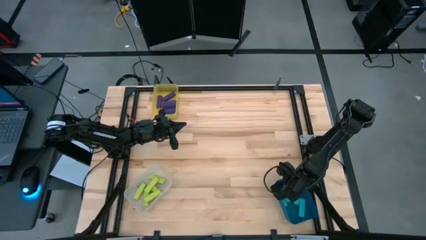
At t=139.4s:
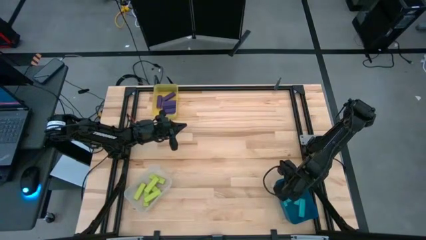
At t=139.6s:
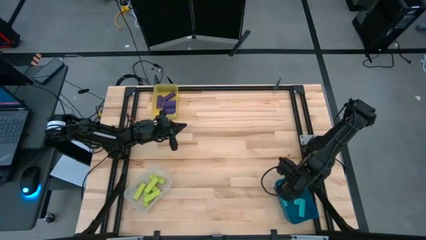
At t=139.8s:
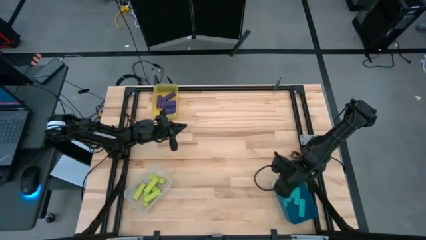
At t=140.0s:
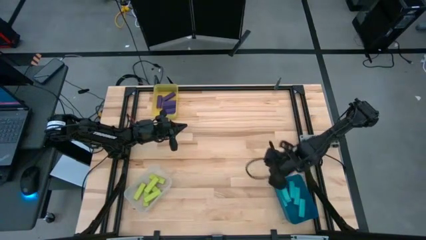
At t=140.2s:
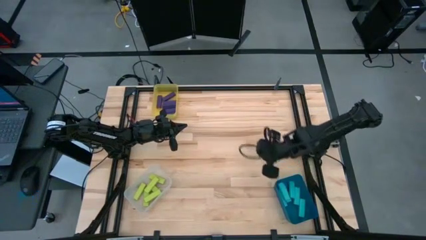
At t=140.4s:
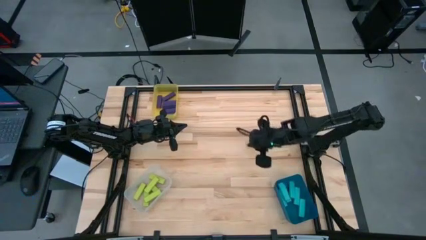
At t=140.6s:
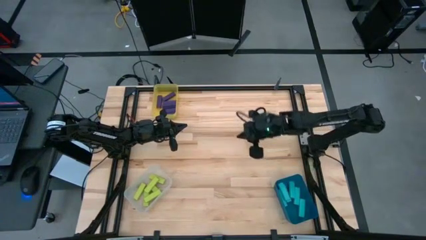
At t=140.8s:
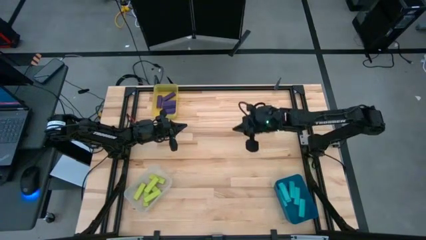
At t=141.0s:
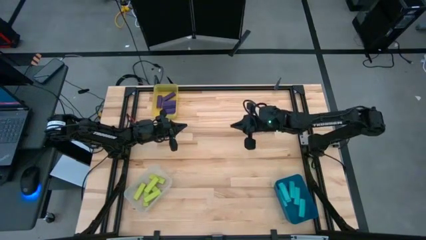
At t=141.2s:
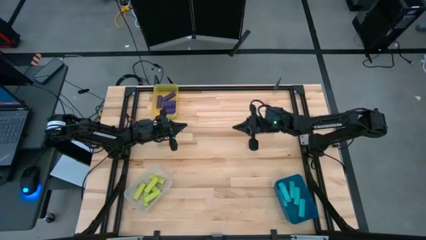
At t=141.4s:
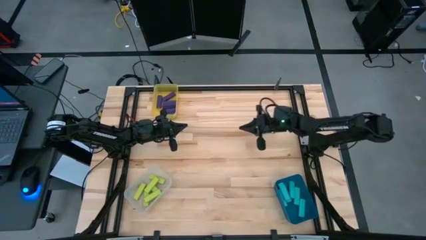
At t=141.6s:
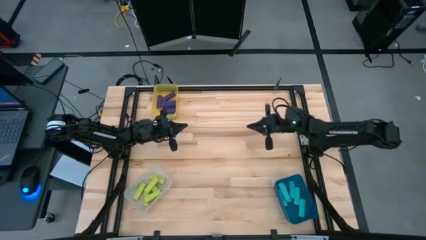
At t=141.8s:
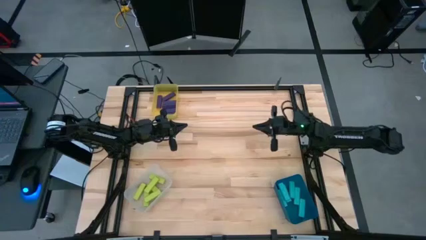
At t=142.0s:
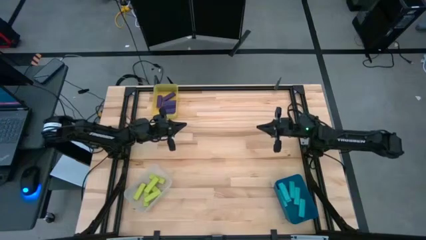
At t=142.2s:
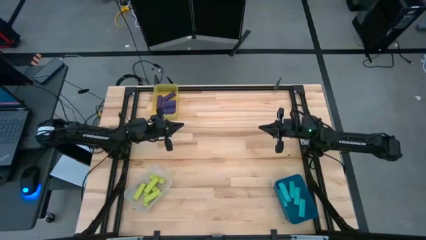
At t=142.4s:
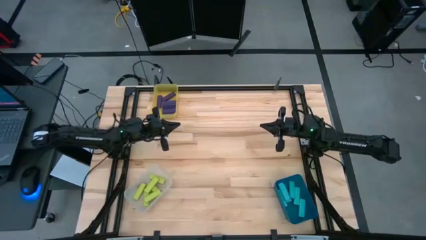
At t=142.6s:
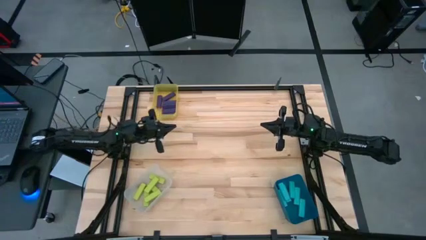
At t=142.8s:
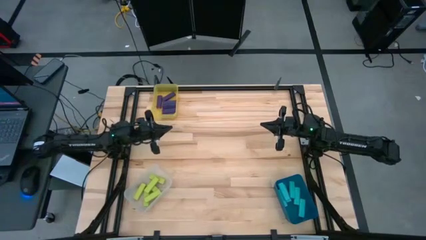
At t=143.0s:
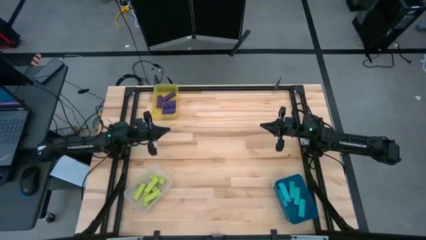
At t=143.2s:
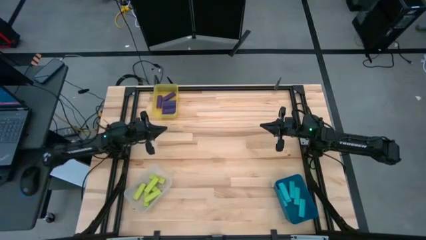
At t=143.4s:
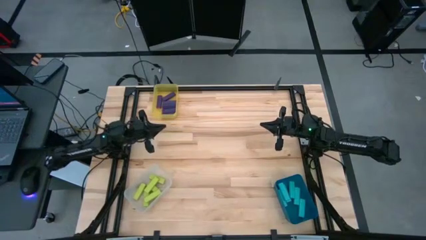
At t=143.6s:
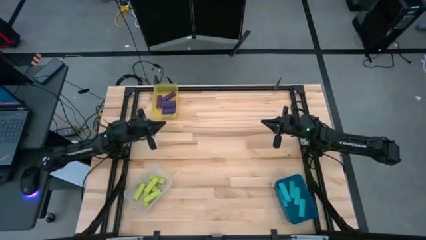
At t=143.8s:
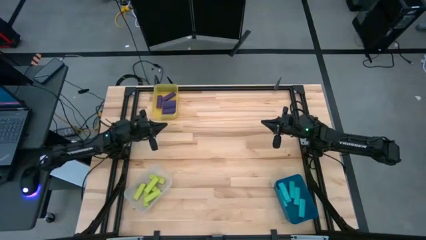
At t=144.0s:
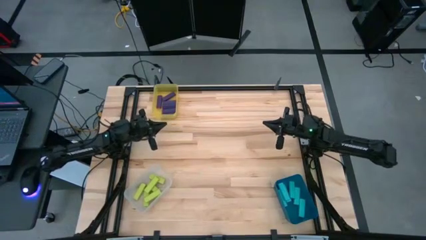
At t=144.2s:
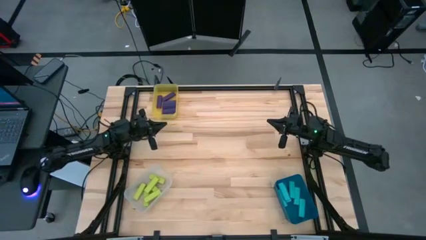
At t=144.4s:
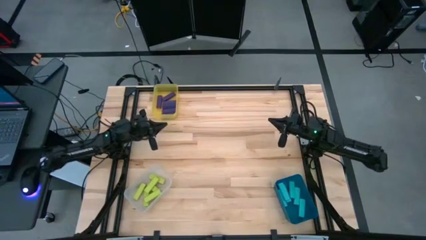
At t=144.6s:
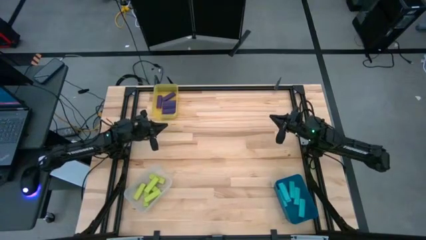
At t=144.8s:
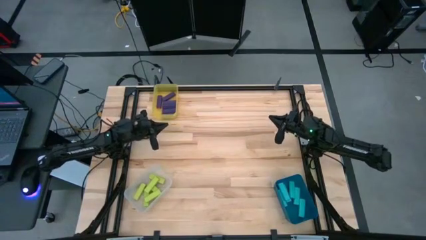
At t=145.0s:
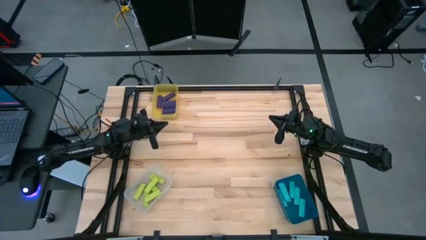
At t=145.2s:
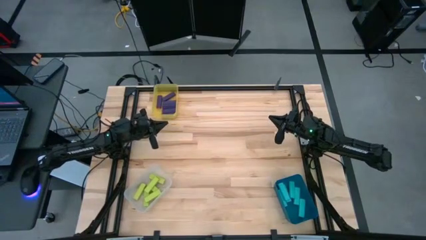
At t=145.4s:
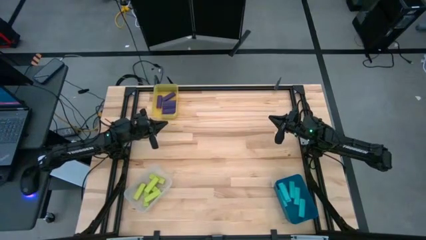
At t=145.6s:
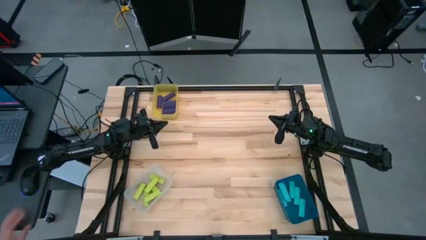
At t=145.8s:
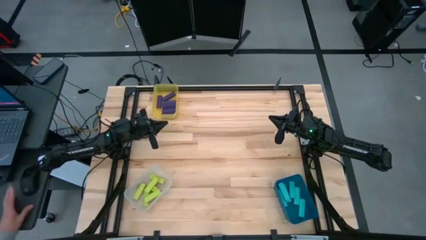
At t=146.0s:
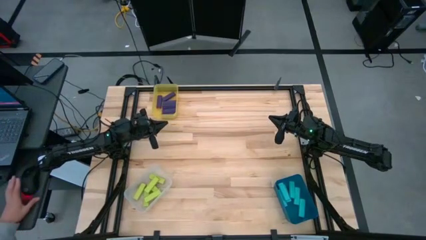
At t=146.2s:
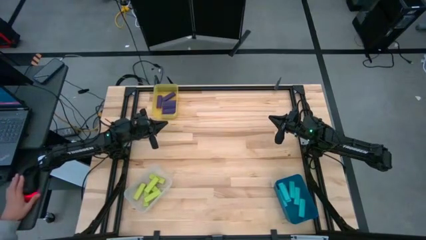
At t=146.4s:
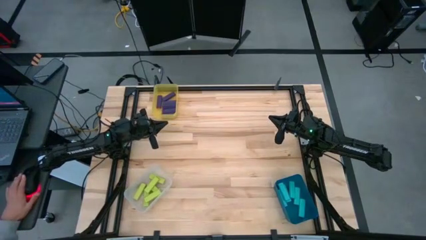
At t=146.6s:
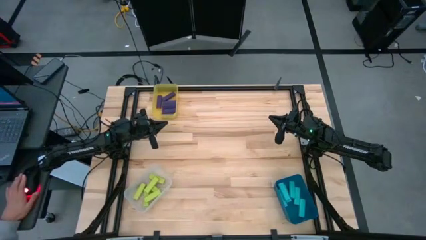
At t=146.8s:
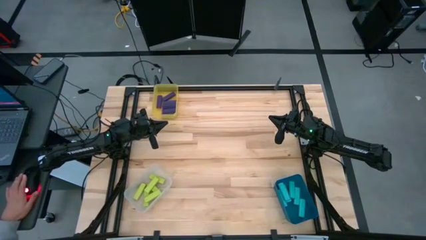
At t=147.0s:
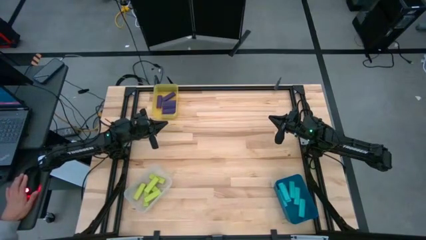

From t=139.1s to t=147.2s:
Task: Sort blocks
Return to Home Position

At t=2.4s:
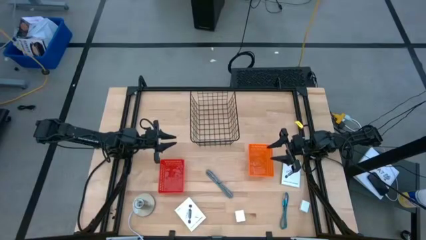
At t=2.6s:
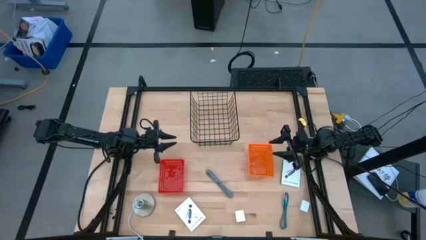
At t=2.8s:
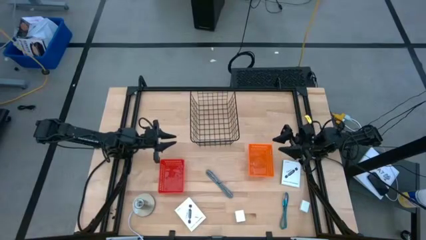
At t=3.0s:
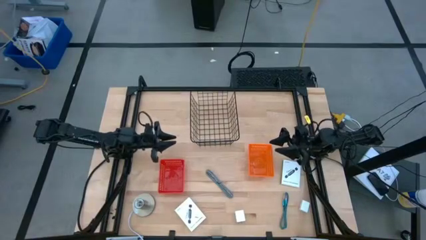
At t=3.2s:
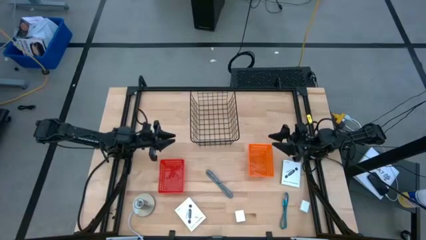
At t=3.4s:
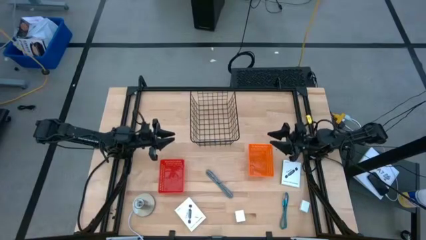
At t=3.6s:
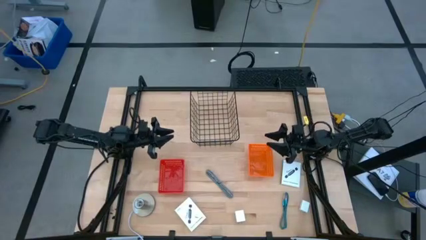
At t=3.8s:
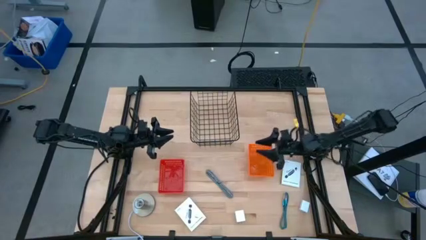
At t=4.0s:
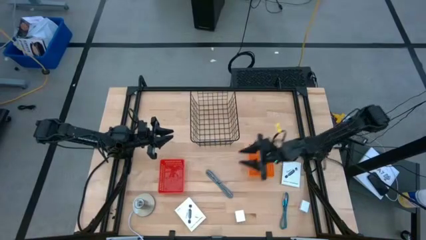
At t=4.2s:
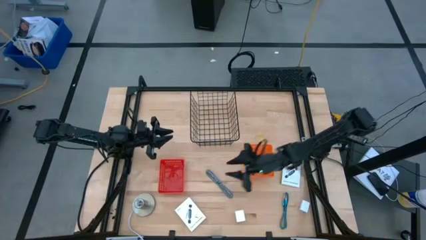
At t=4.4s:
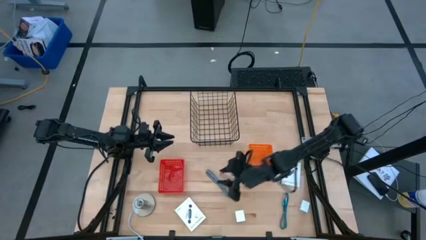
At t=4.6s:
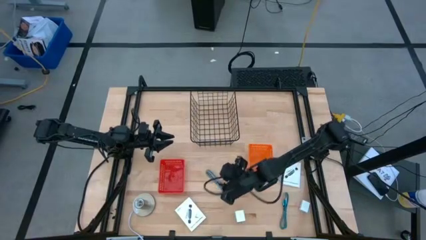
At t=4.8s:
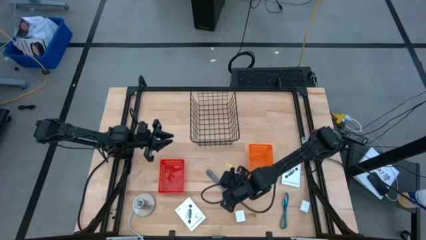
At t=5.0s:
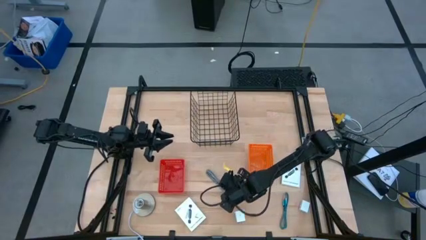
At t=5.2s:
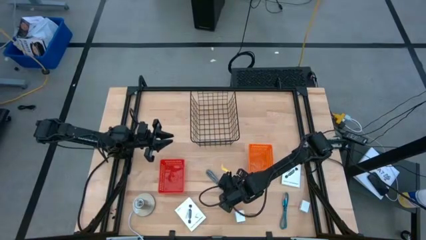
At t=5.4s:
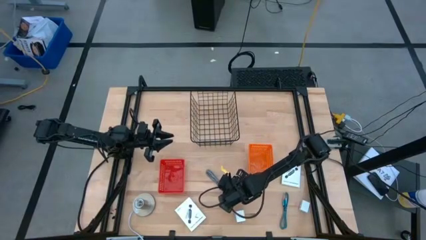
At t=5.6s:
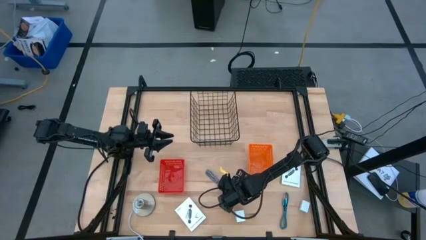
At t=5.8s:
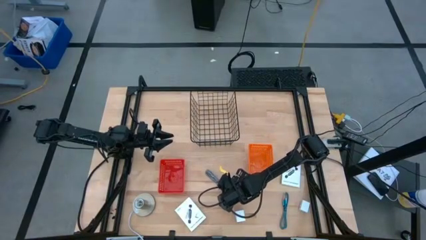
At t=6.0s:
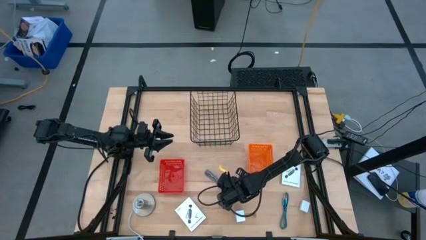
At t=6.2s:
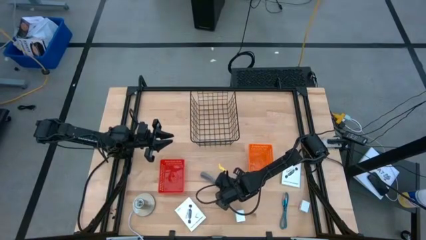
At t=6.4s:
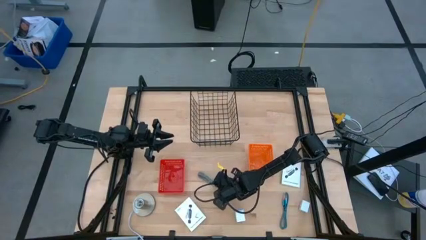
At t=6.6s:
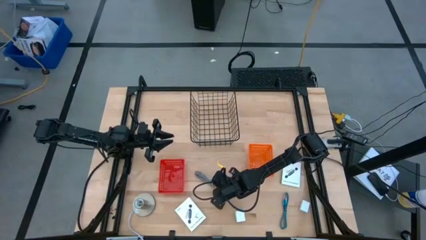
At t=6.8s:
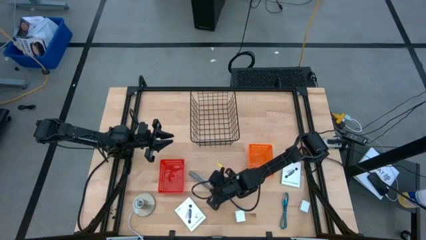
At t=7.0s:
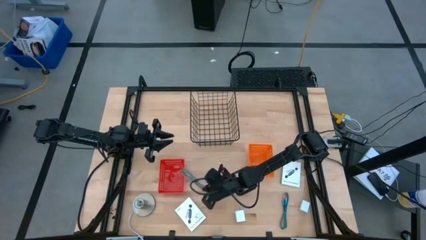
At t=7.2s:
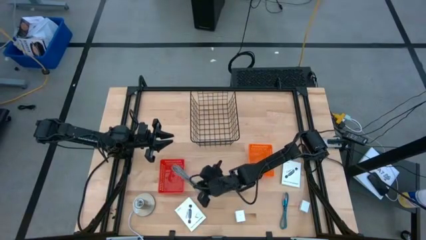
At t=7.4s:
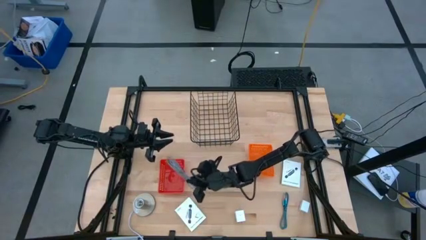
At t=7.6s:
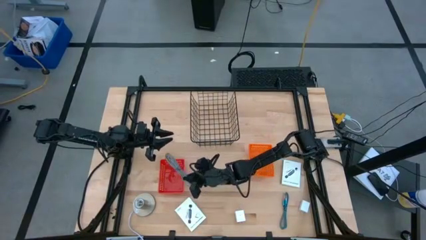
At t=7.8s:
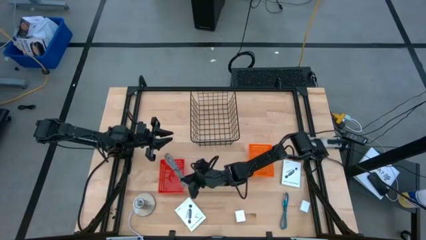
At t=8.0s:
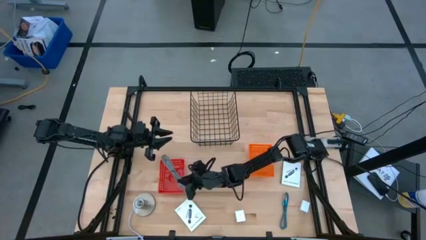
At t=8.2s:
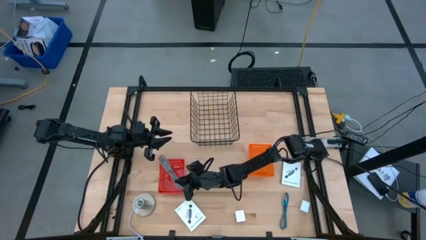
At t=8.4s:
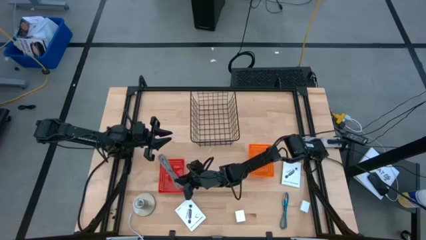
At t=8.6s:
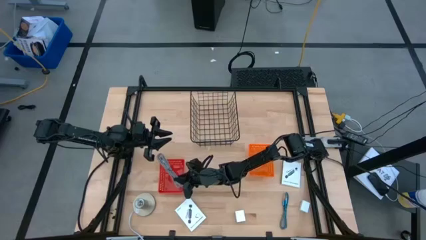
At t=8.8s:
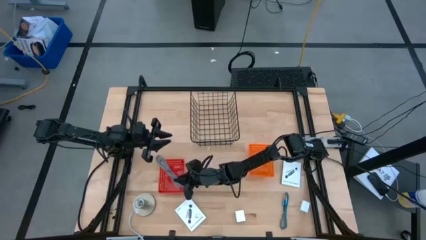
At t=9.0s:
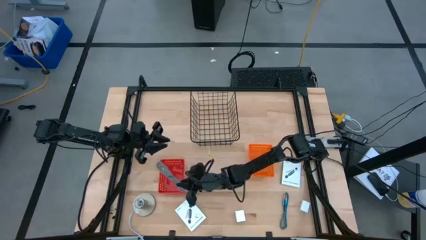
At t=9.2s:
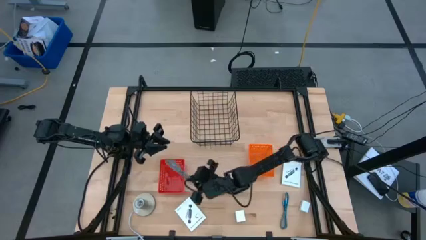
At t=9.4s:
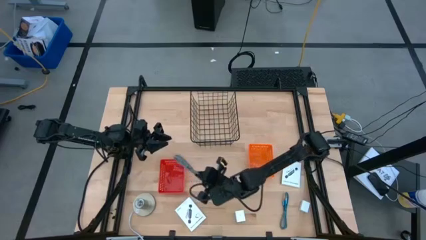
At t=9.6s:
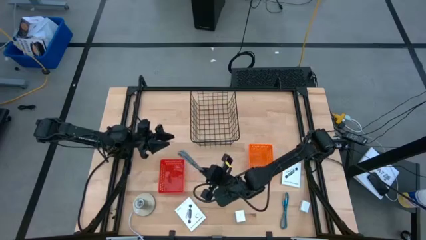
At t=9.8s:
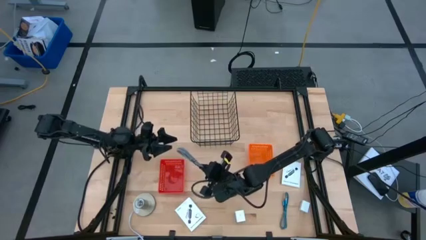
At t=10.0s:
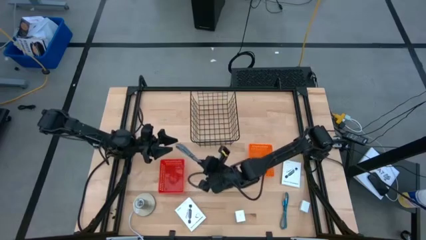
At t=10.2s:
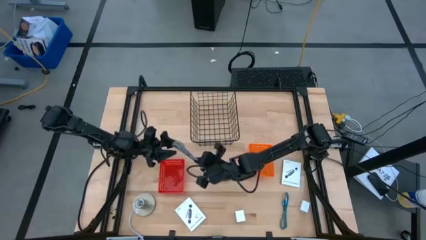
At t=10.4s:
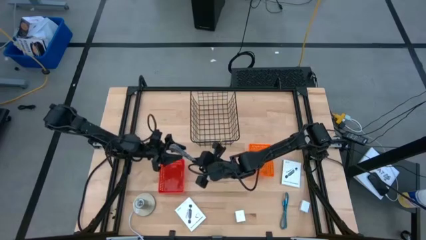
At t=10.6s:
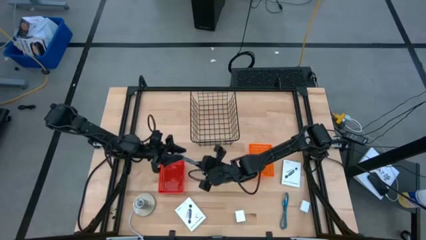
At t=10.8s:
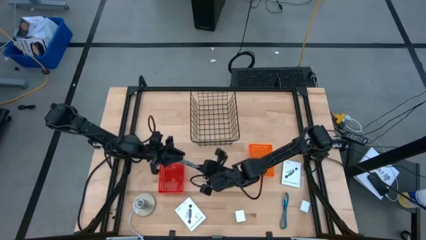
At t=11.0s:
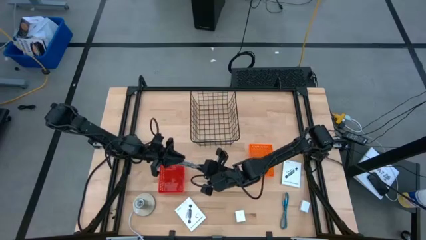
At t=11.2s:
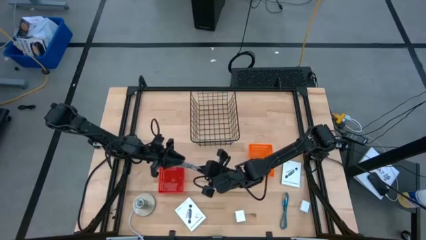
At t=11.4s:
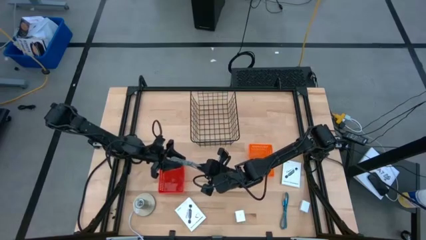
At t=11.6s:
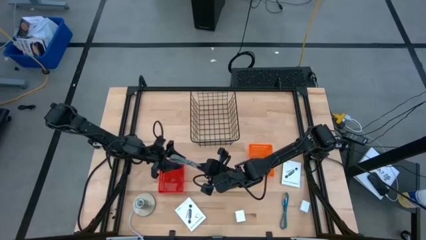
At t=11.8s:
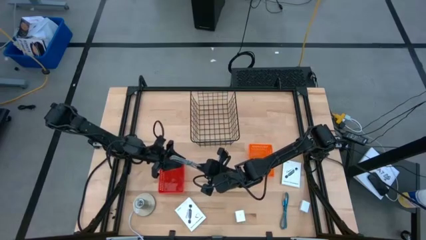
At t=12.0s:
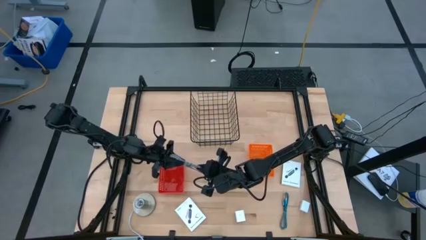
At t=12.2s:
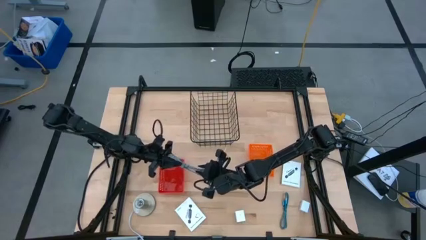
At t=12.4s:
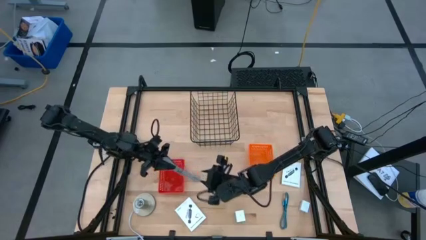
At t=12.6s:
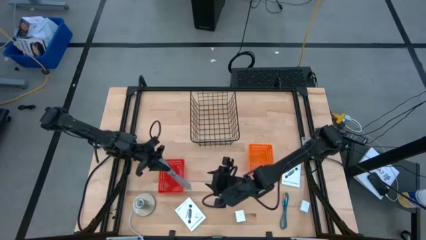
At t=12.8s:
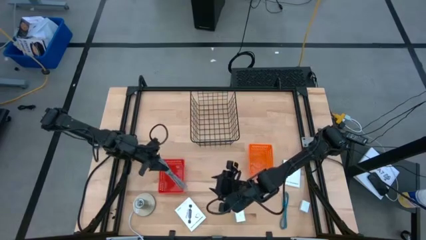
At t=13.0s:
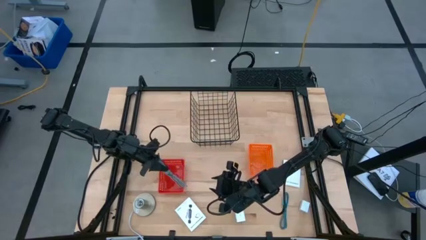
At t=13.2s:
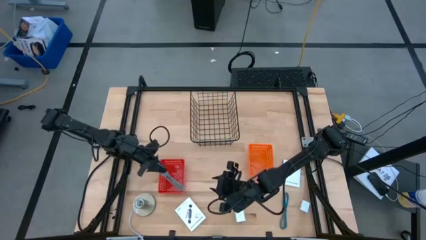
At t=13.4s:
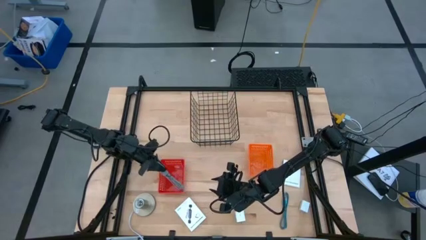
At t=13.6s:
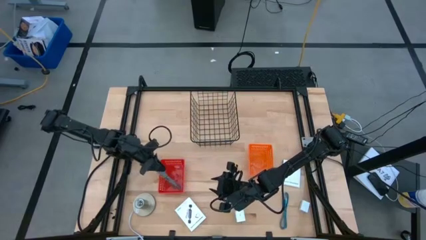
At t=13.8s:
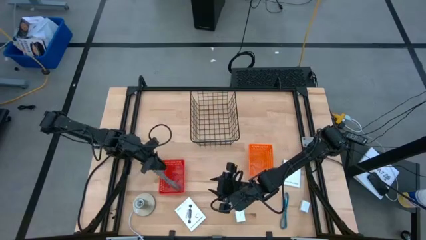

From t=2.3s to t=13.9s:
Task: Pick and place items into bin
Put the white charger cable into the red bin
